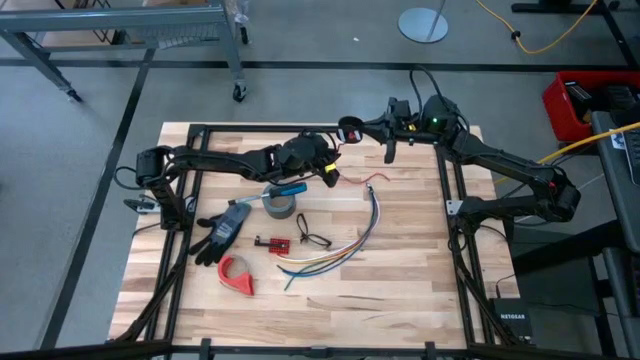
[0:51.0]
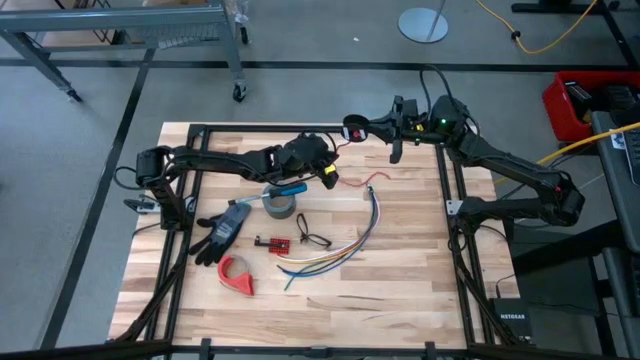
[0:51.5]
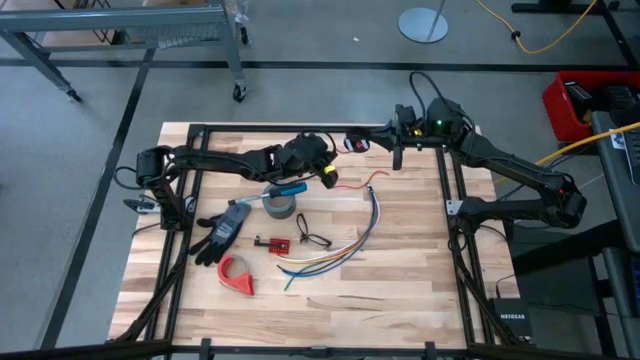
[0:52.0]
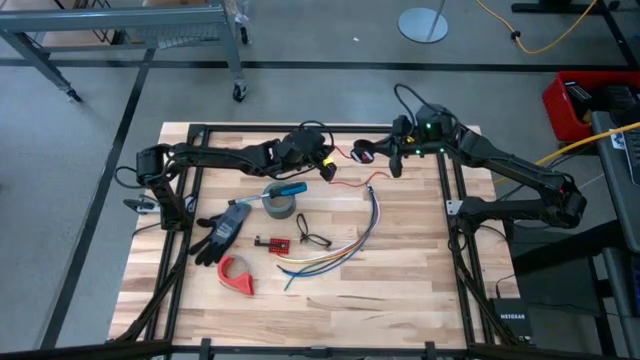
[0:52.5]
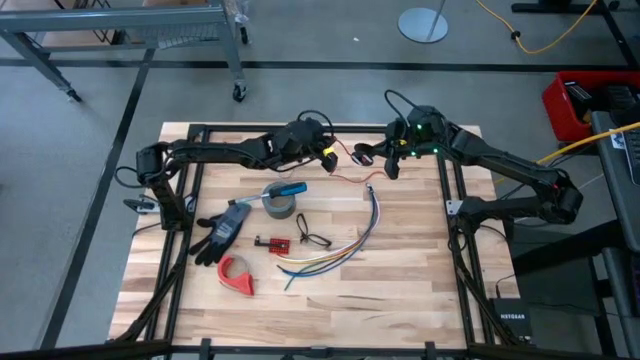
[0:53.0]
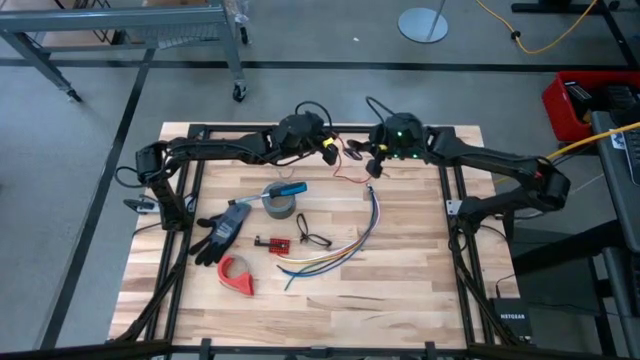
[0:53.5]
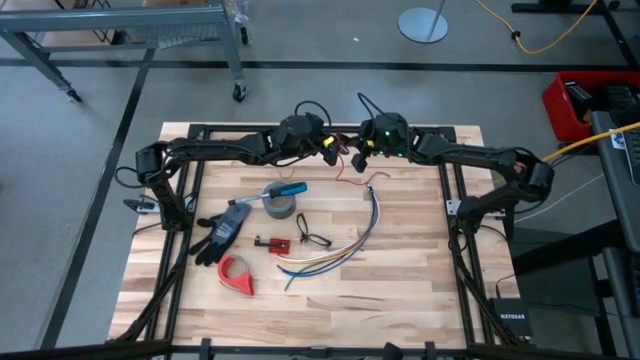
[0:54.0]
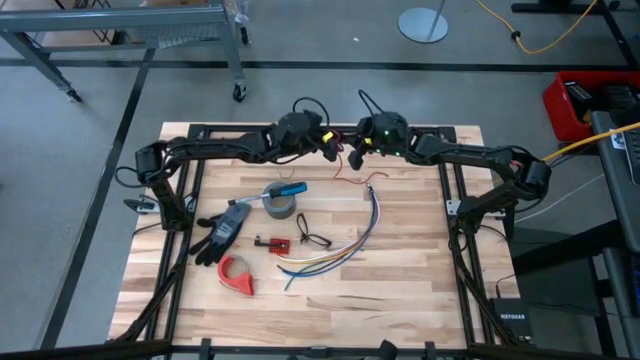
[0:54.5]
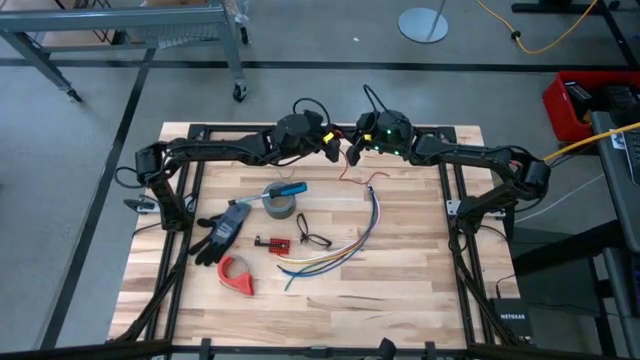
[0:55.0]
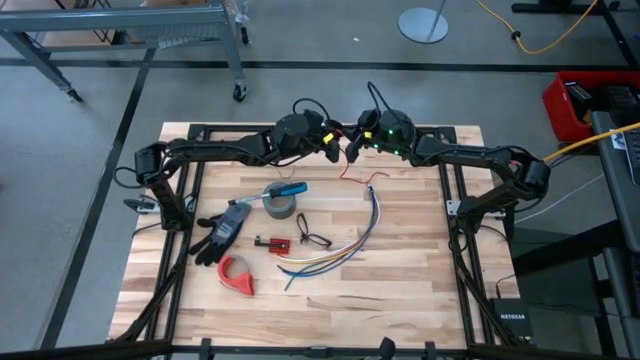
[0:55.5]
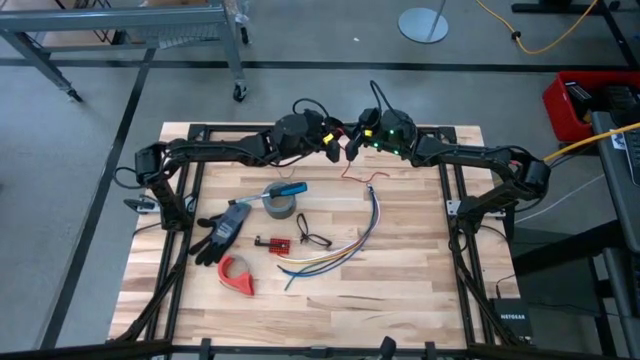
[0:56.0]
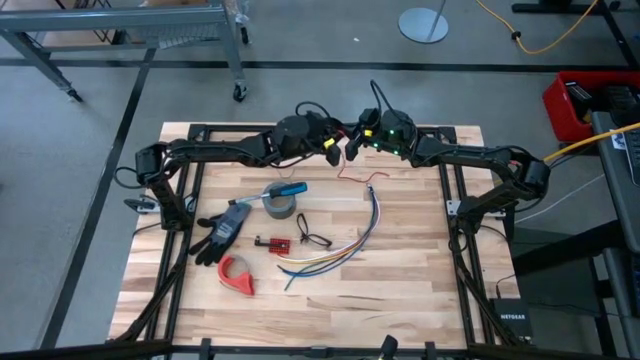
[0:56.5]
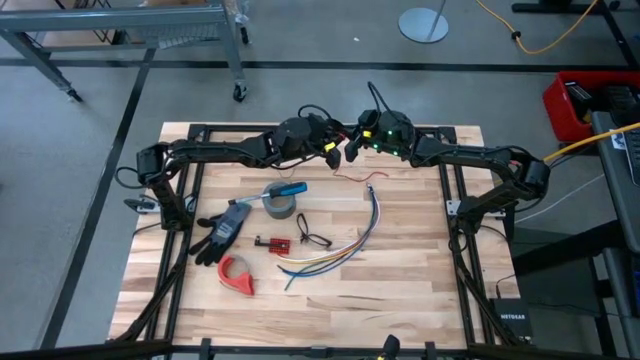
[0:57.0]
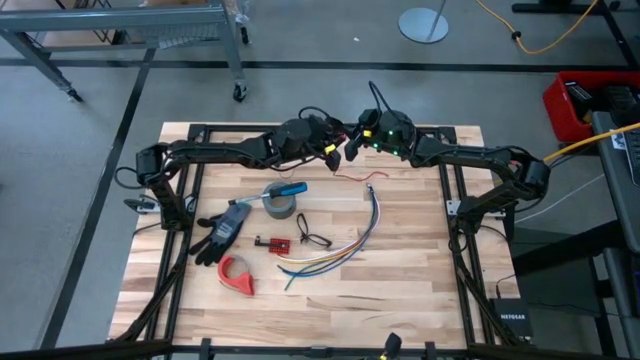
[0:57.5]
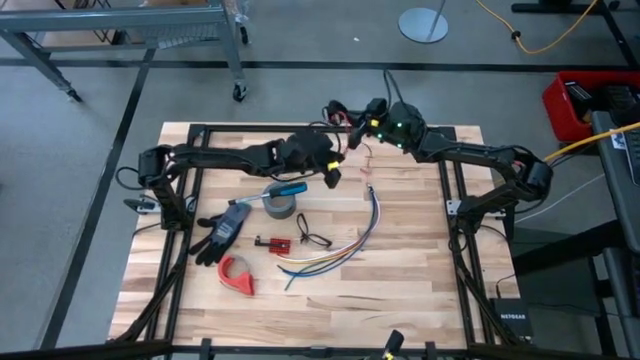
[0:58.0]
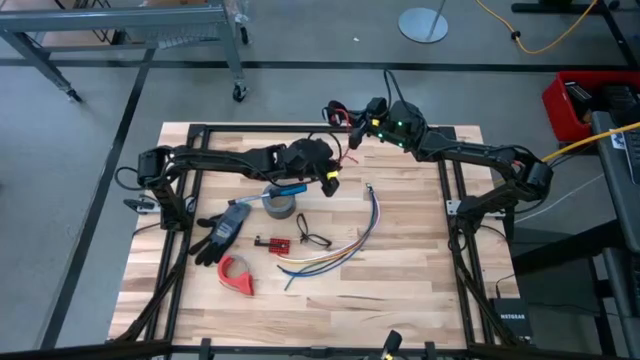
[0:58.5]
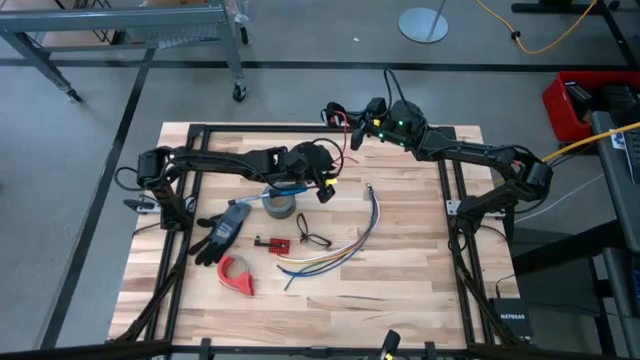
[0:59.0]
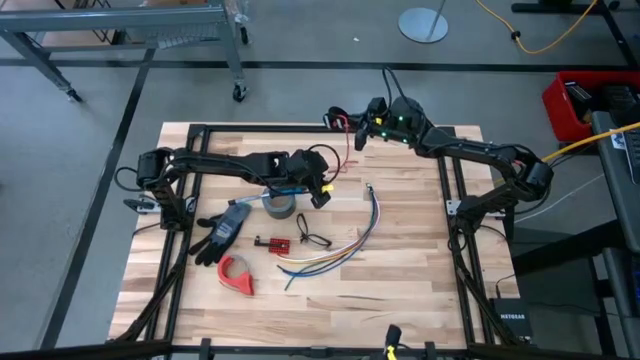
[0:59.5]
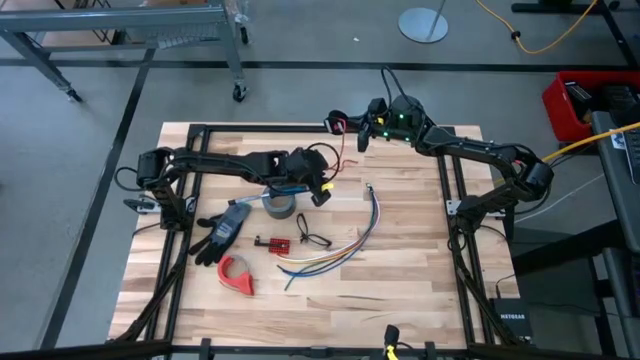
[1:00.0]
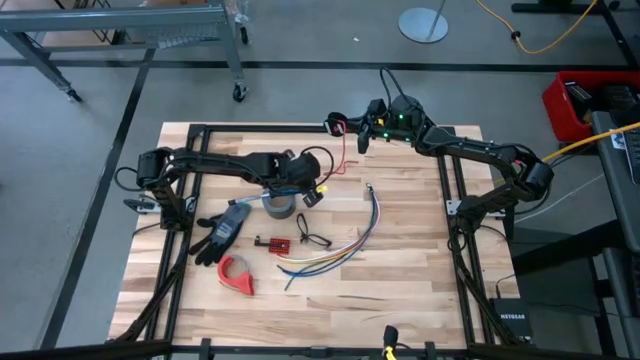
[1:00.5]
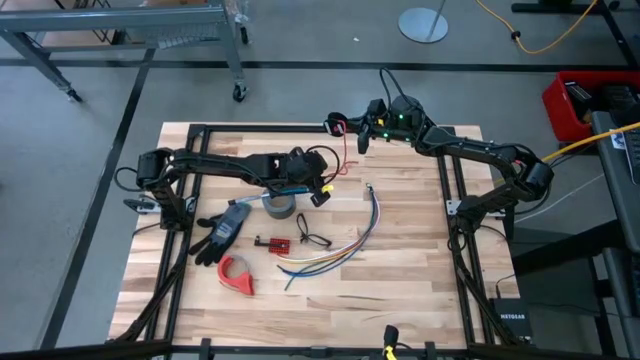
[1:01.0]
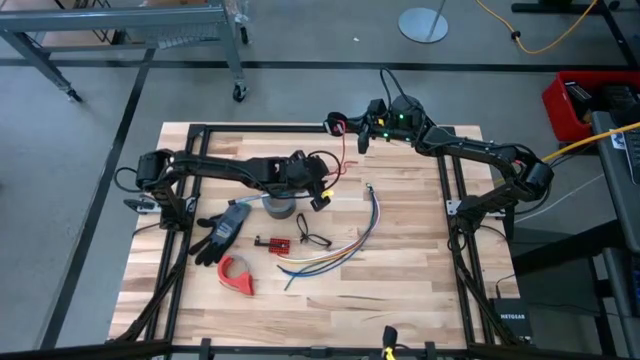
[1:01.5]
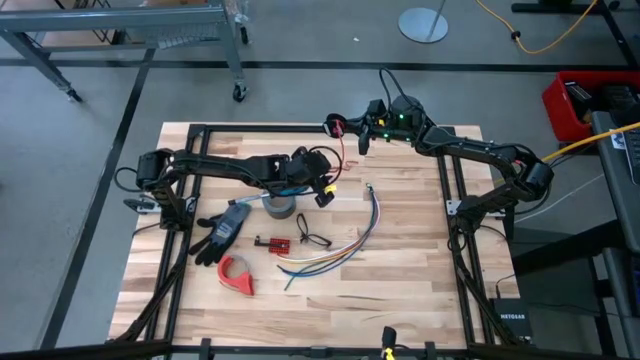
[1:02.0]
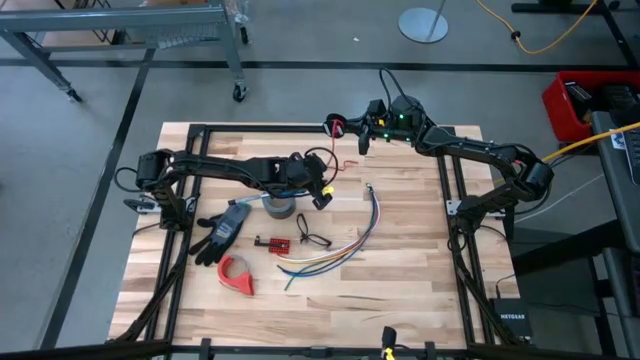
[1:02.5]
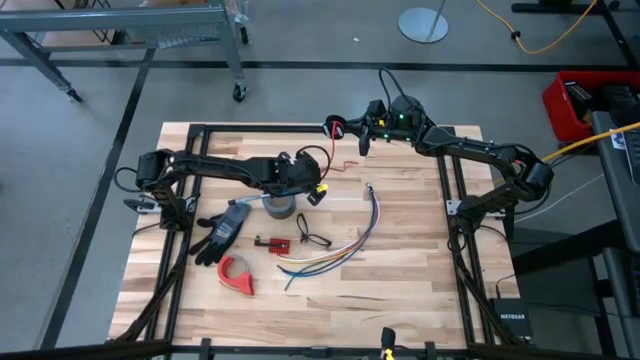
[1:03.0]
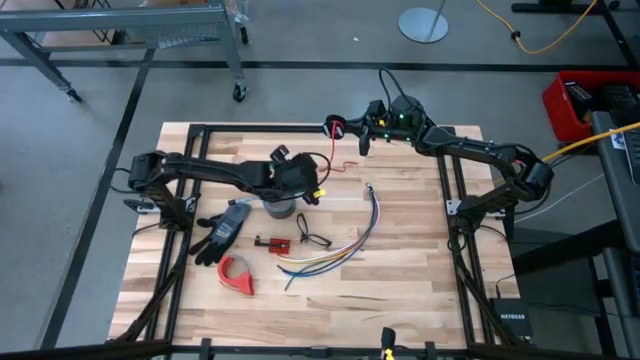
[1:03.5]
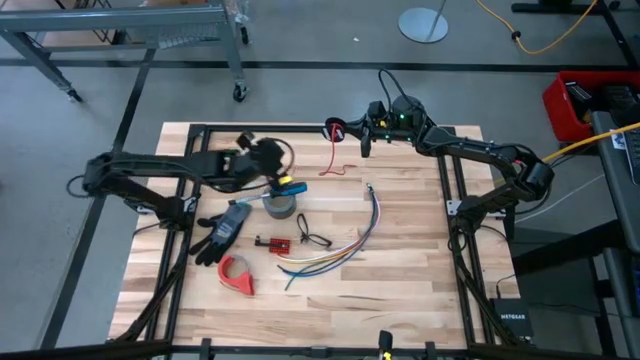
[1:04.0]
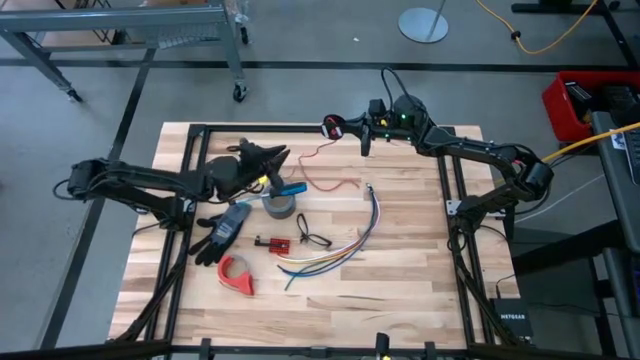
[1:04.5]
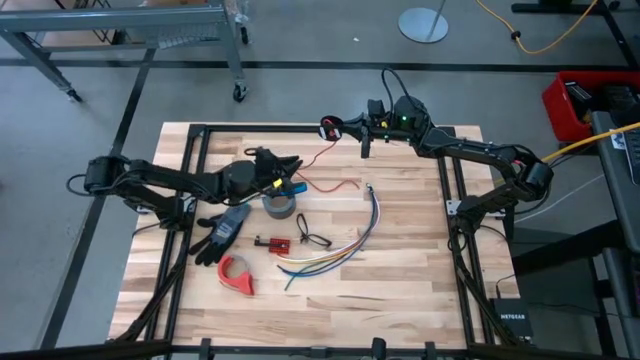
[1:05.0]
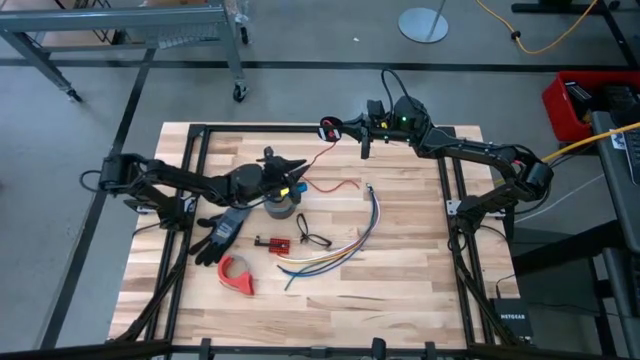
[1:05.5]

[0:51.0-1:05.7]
Task: Coil cords
Coil the red wire on the spool

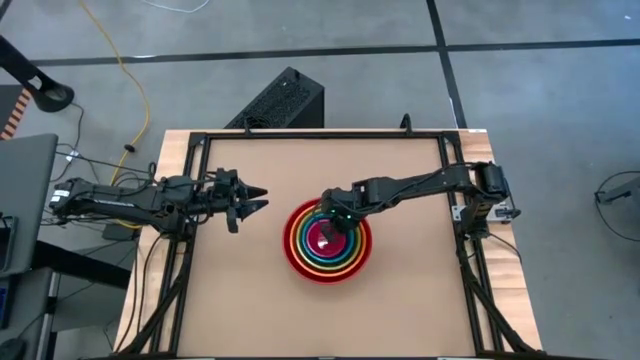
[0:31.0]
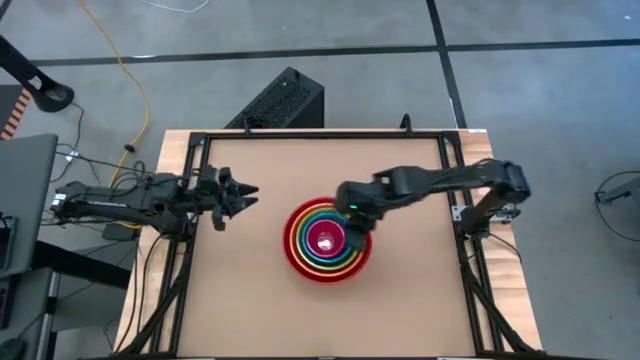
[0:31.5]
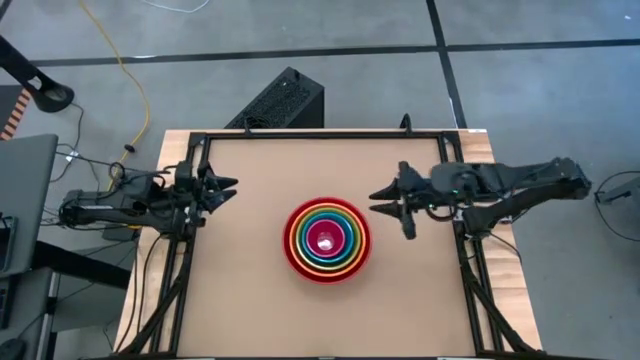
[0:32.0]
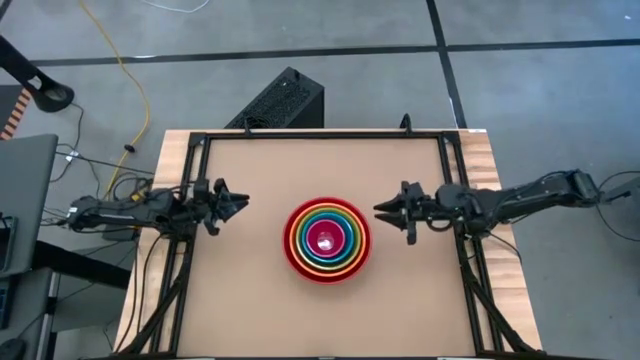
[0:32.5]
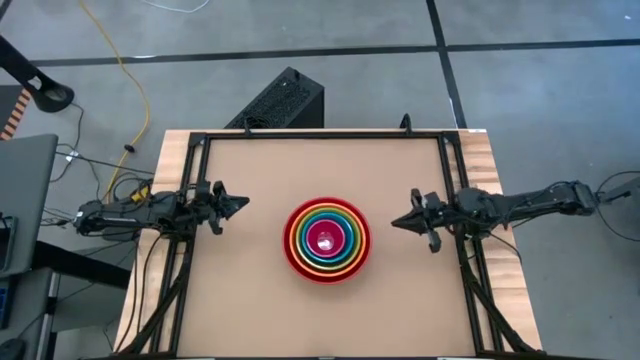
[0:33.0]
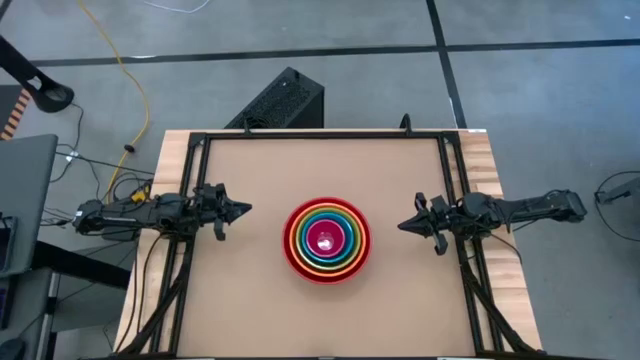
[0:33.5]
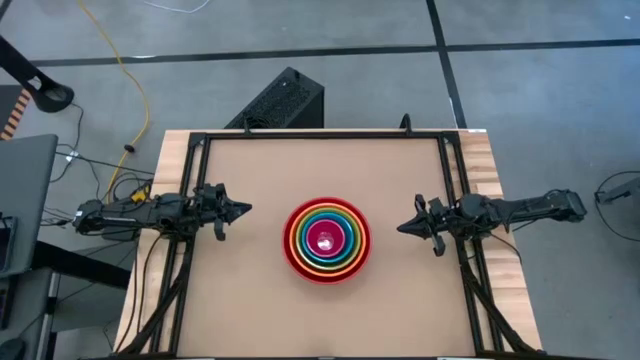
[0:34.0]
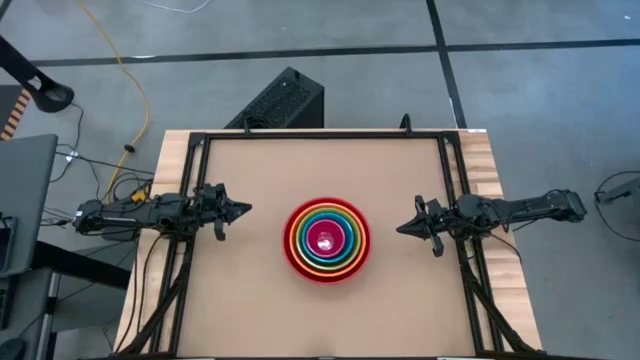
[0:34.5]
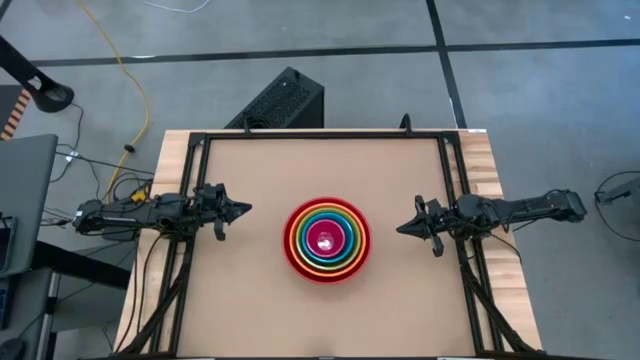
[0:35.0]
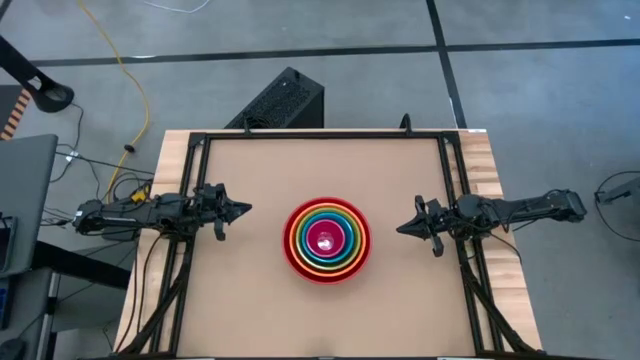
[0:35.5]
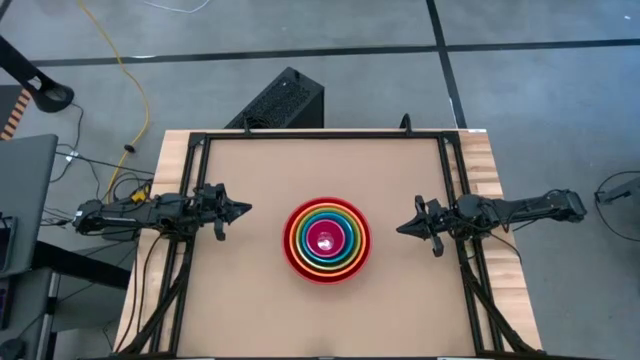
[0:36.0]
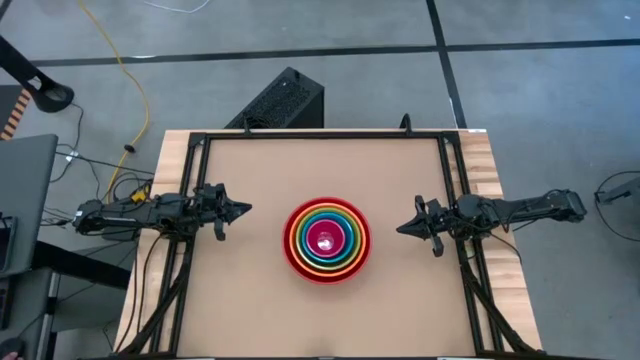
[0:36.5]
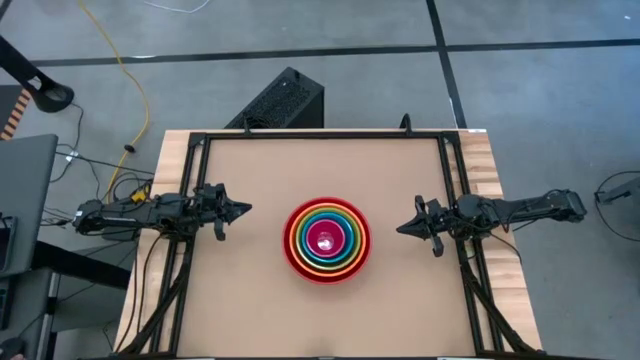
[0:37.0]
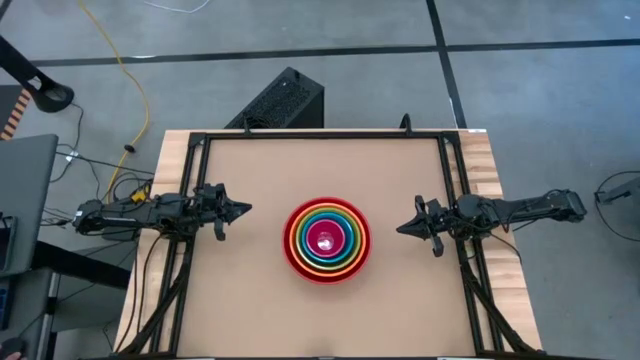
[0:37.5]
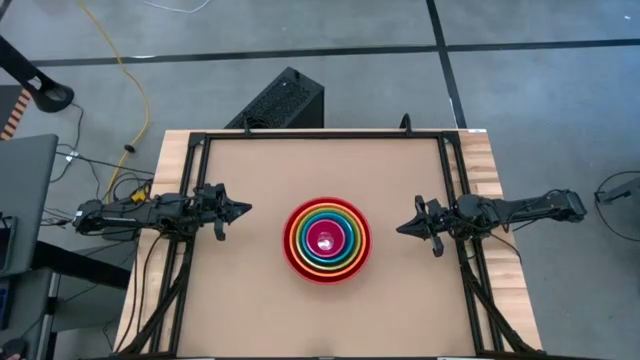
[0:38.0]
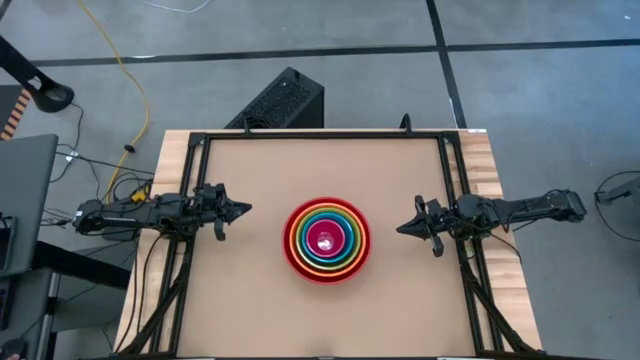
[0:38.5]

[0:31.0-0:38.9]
Task: Nest bowls inside each other by size order
Return to Home Position
